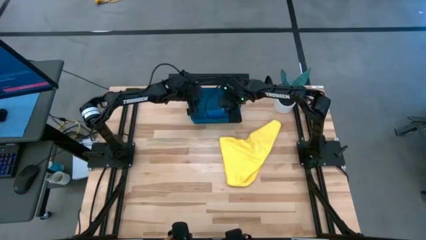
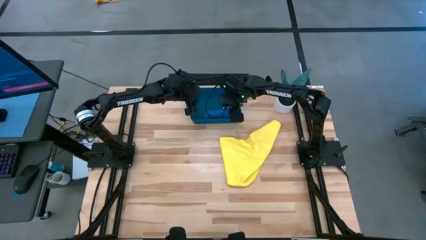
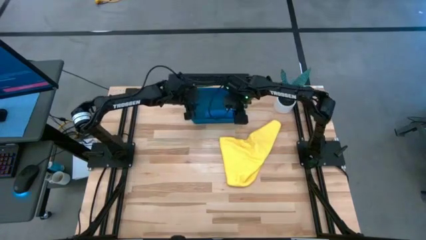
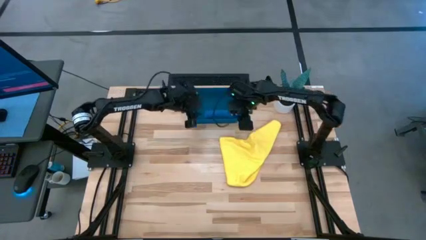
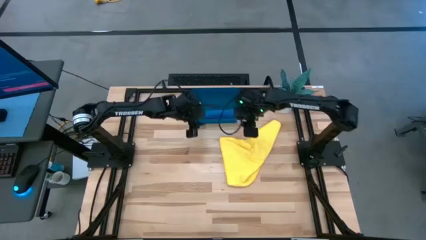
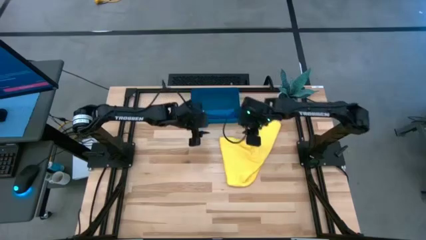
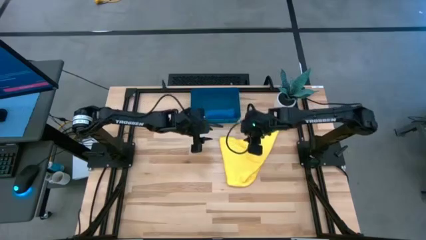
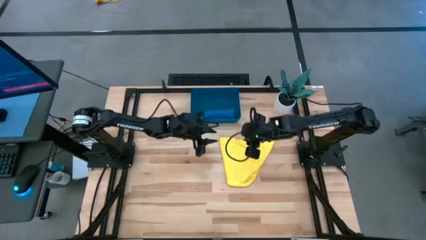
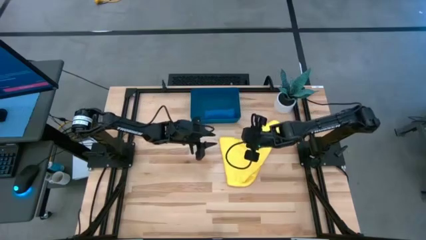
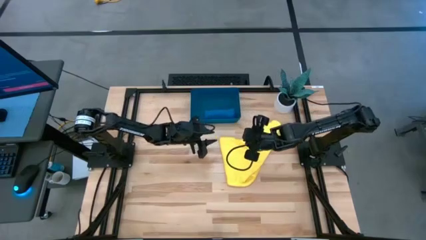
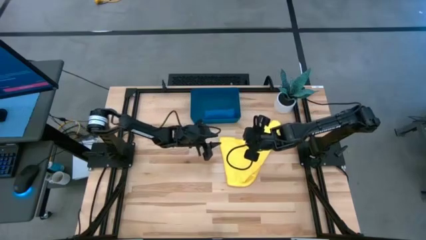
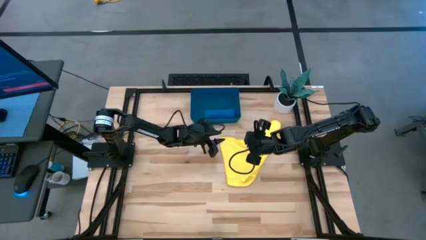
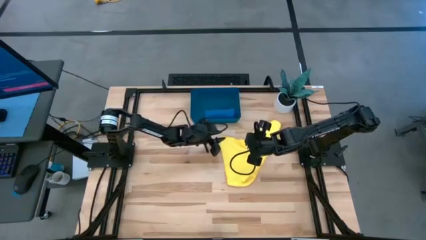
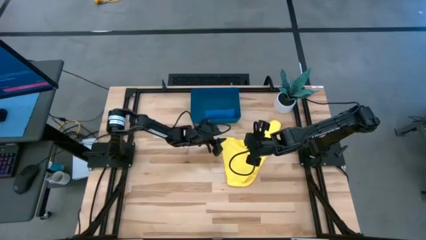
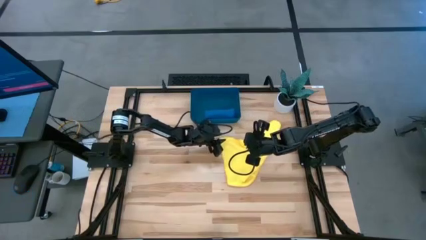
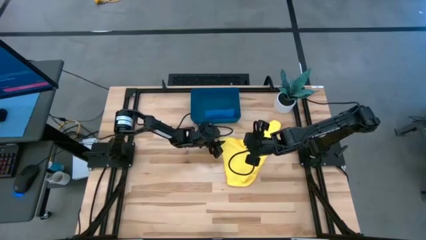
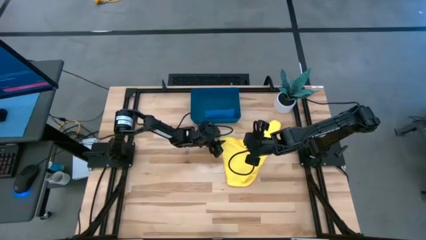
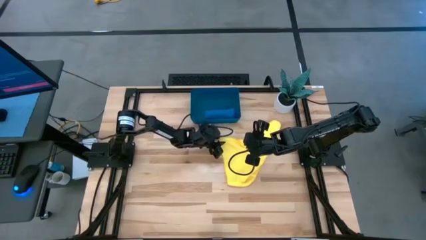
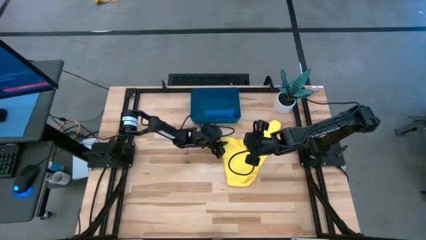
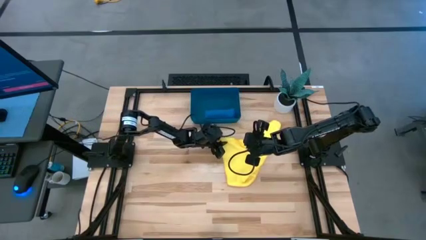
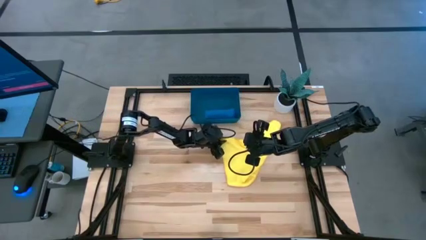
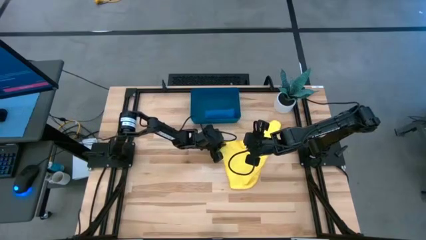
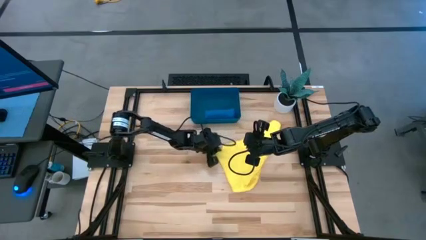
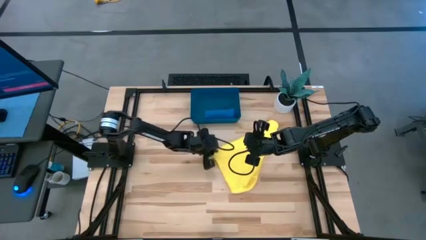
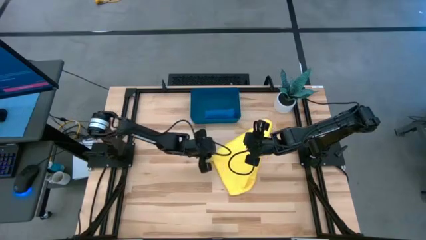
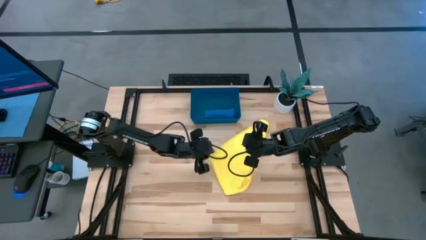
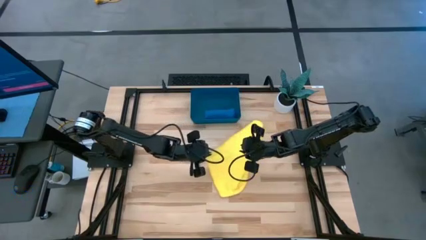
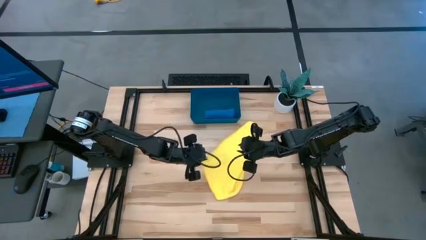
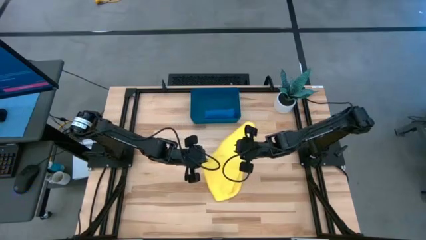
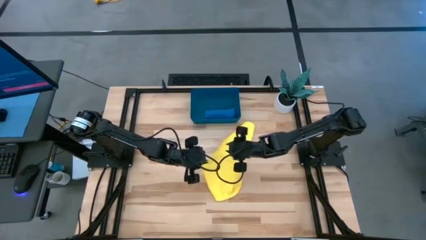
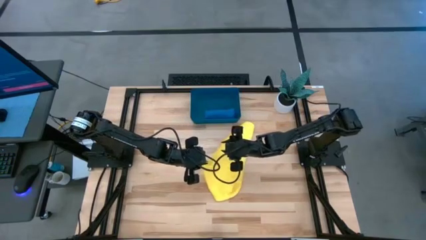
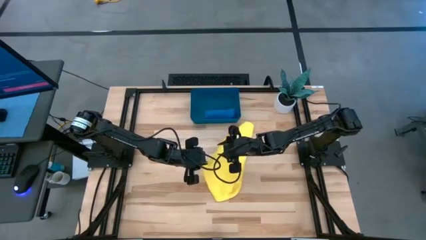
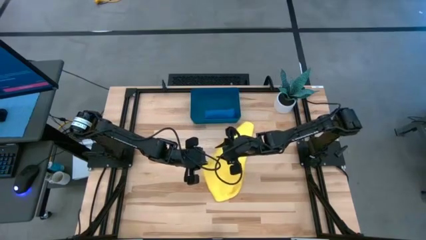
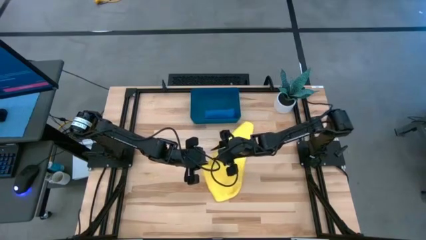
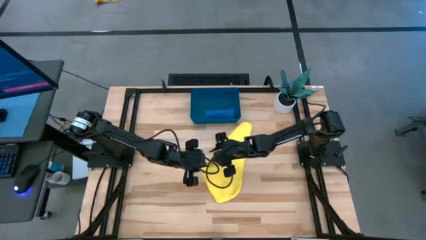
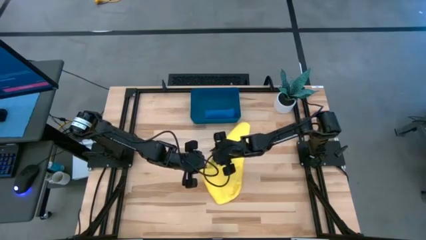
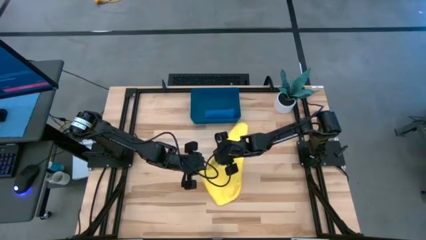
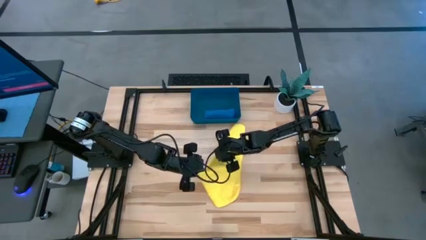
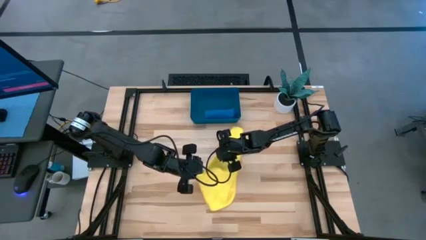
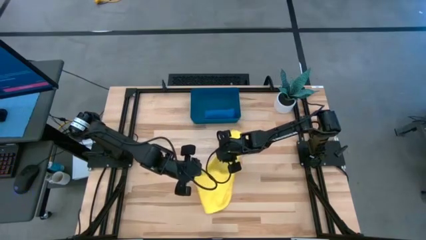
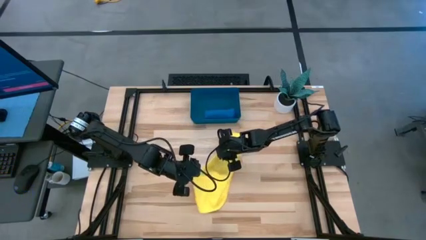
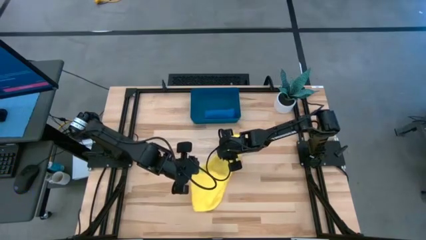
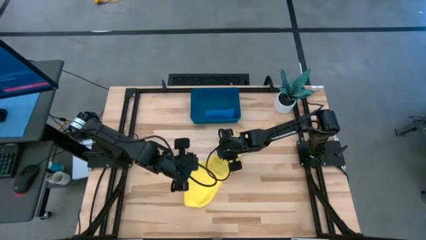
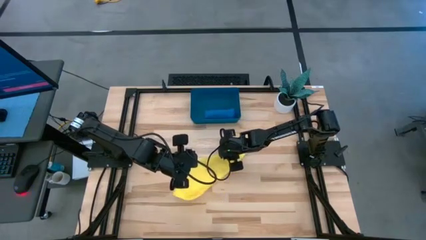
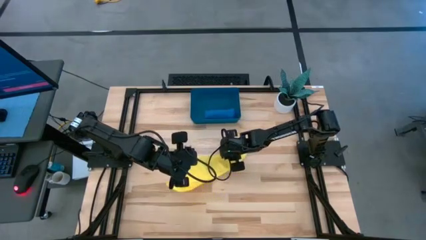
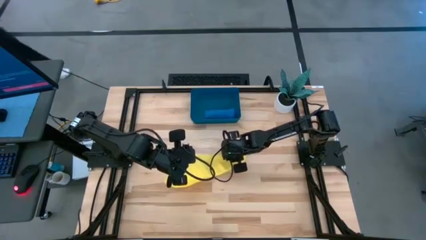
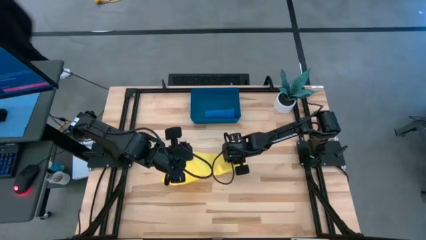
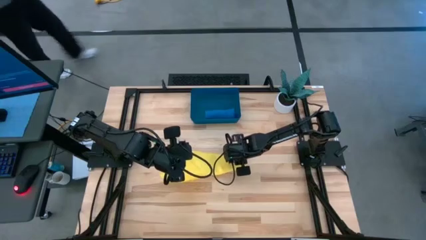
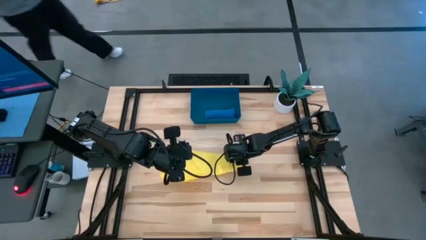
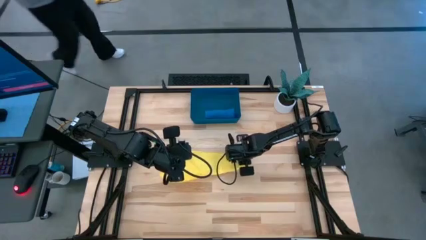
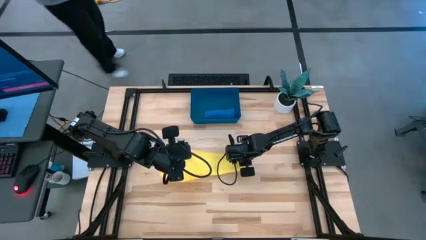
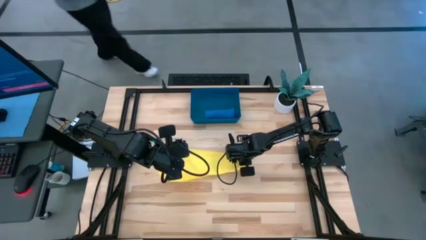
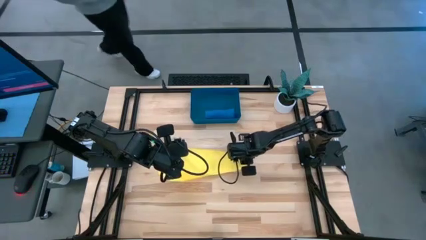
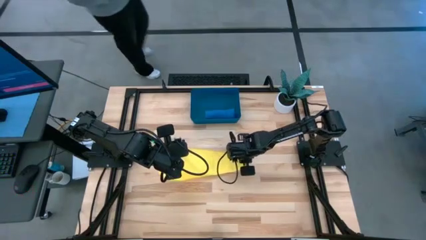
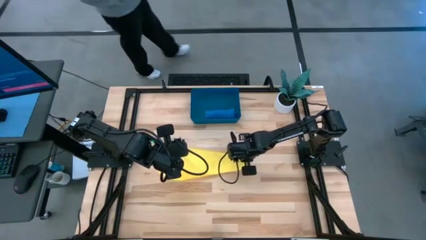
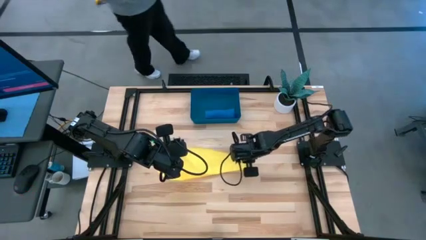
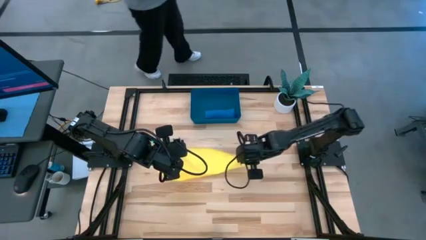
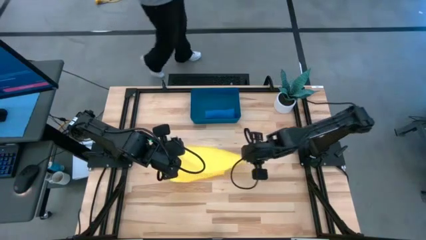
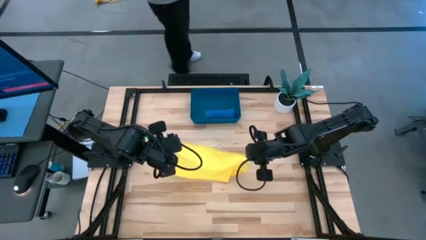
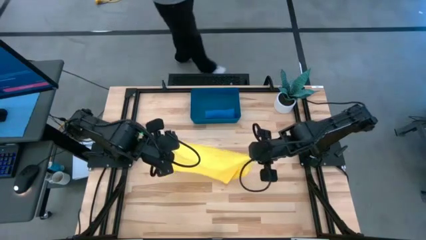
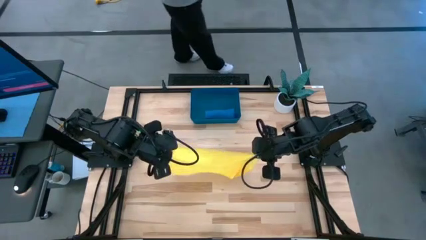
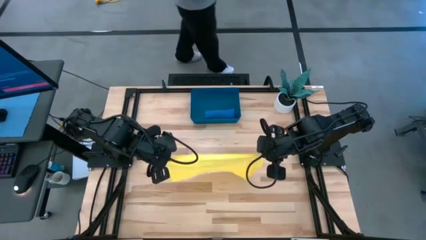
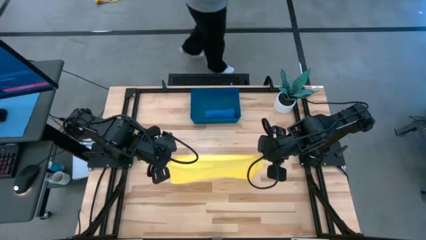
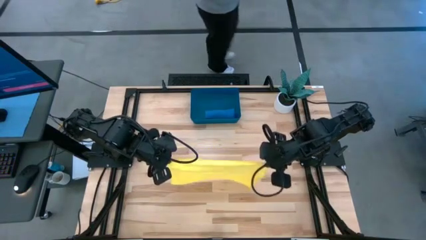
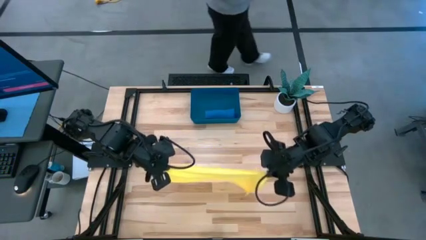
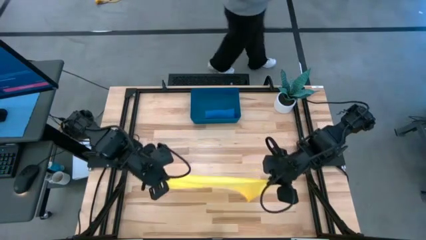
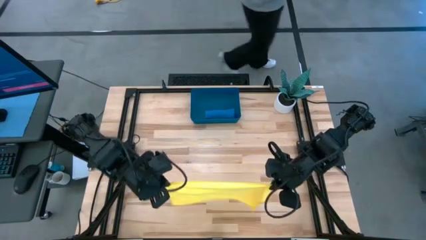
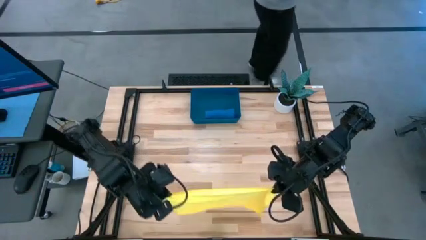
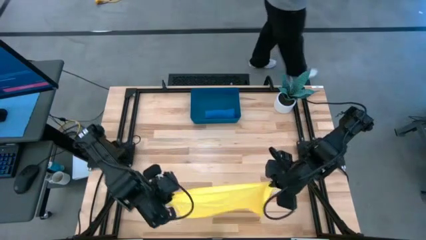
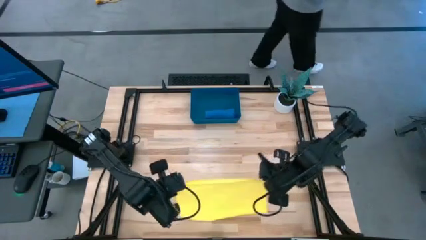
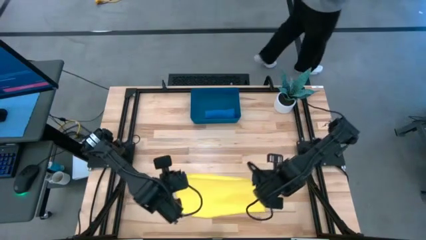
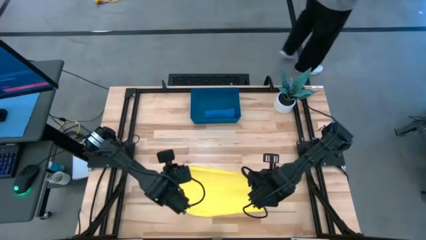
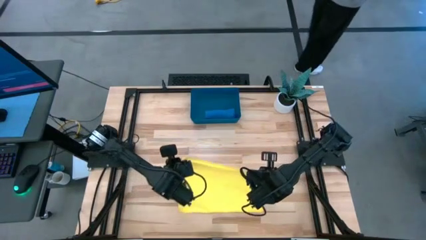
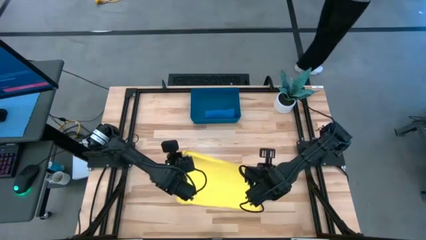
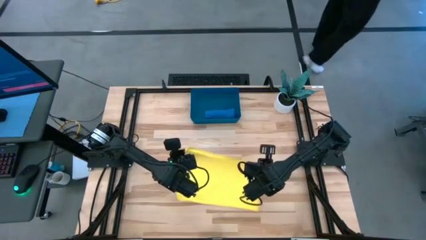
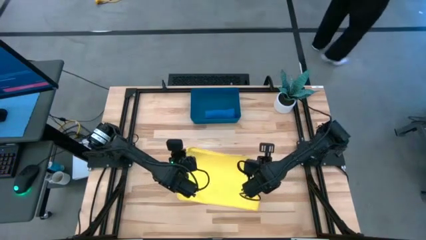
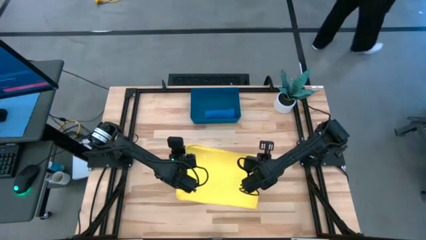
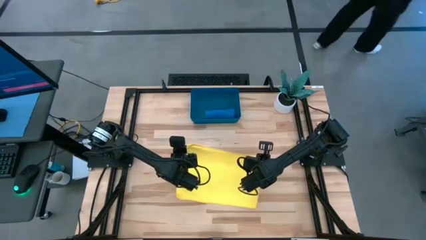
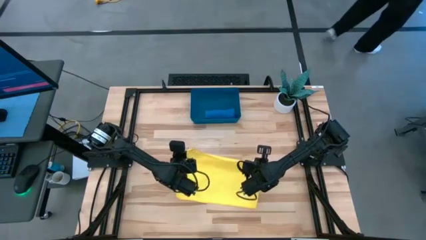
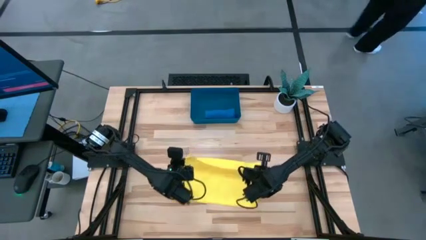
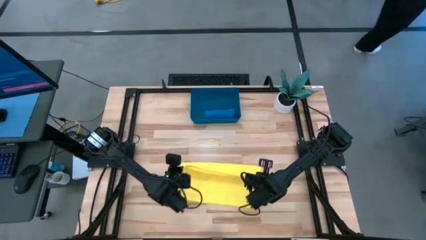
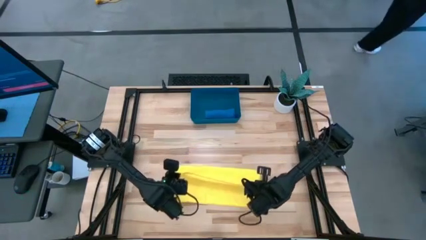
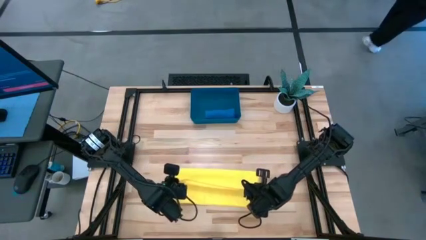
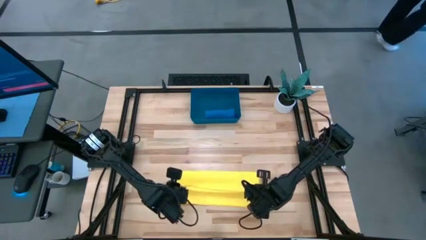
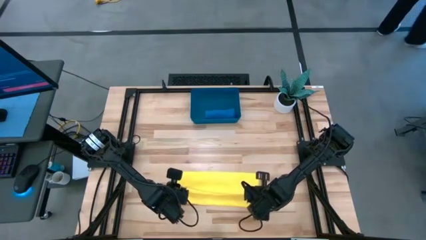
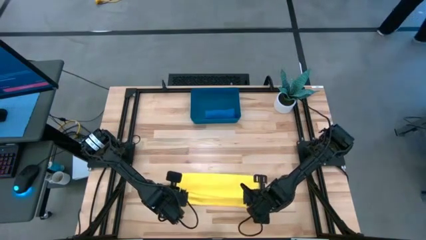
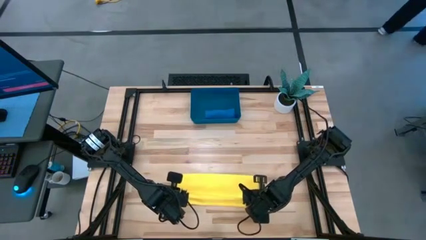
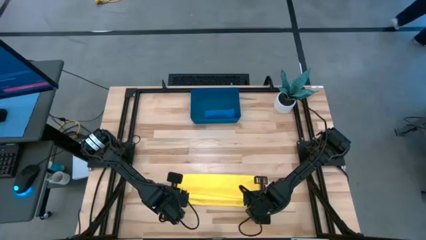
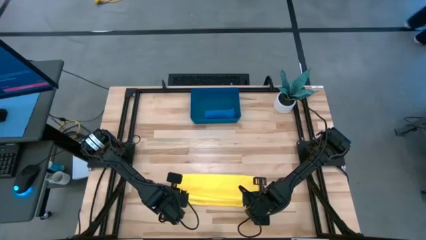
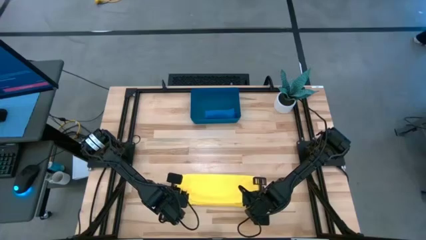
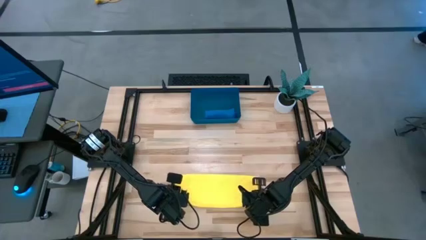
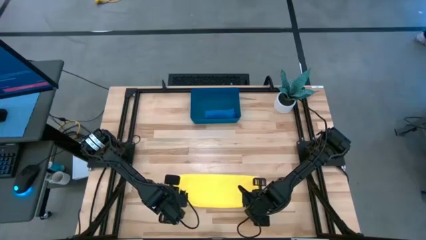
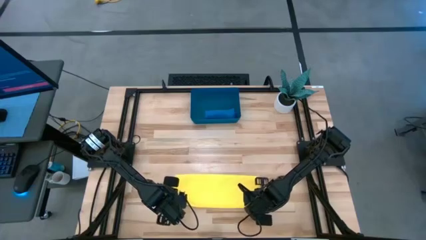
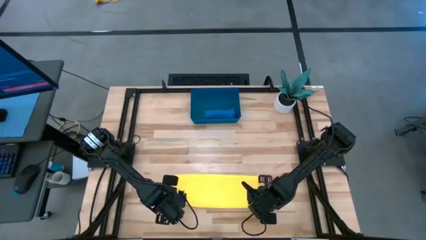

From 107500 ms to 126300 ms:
Task: Roll microfiber towels into tight, uniform cylinder then place into a basket
Fold the yellow towel
